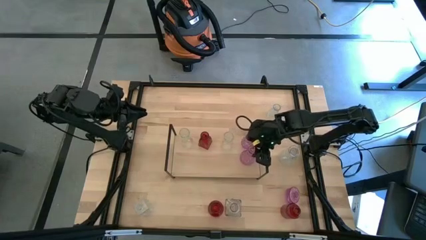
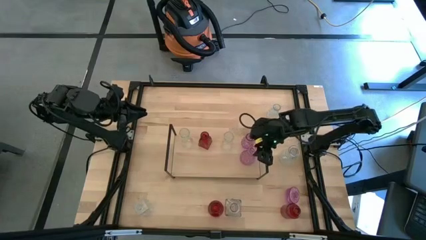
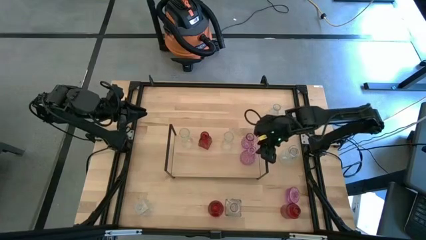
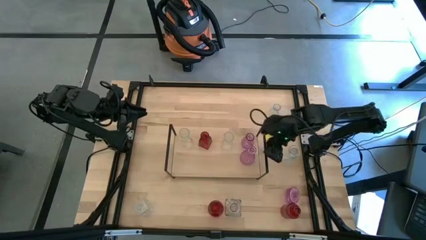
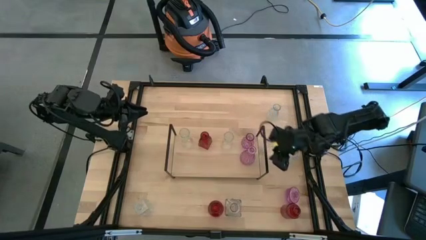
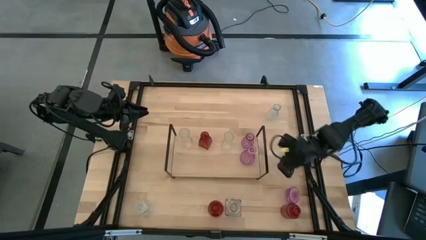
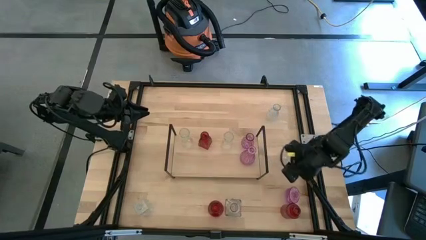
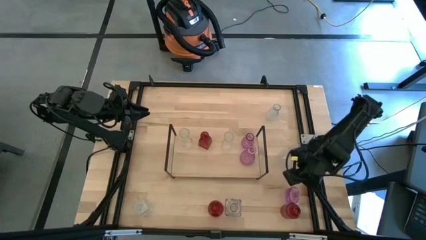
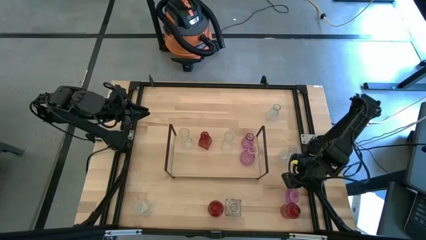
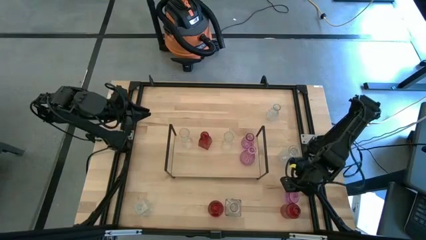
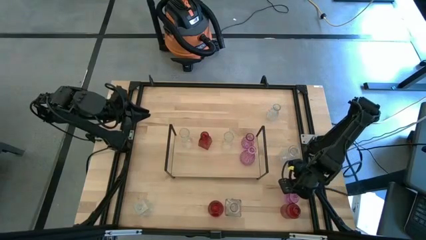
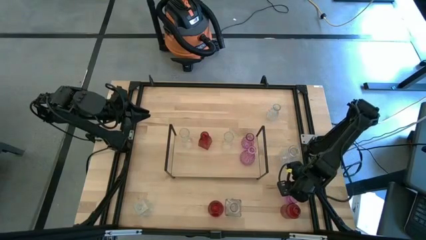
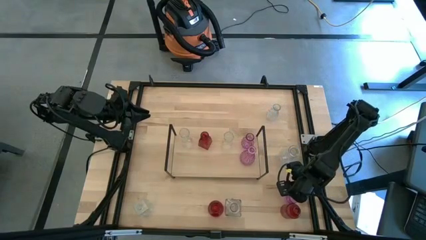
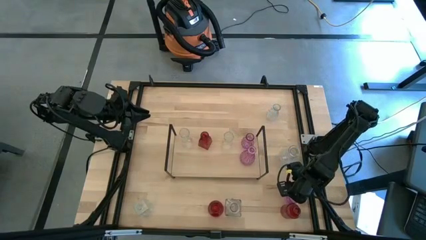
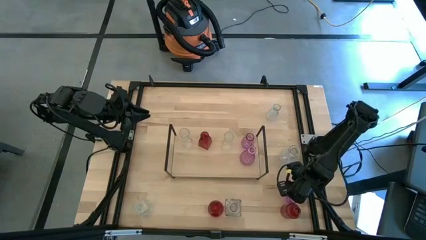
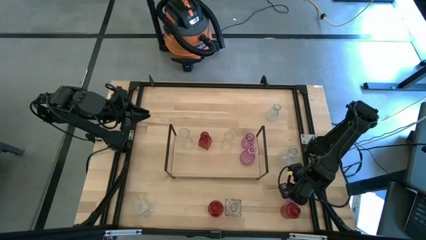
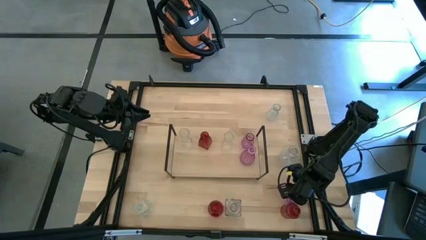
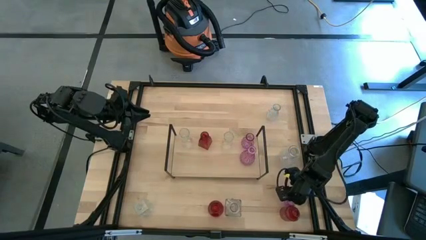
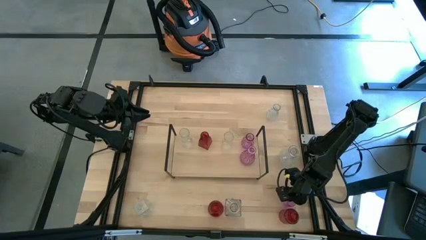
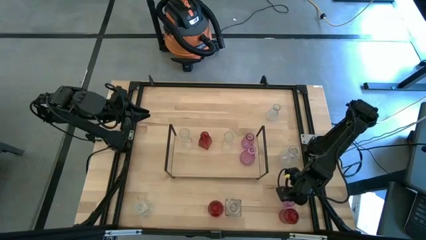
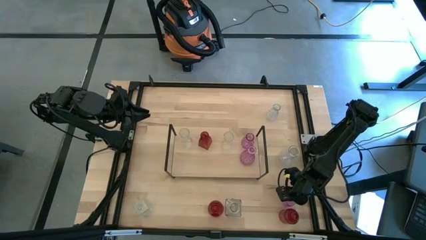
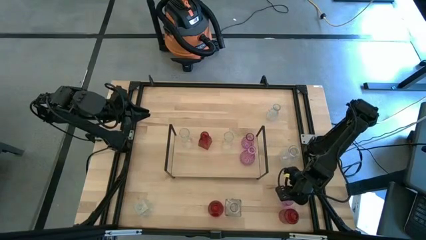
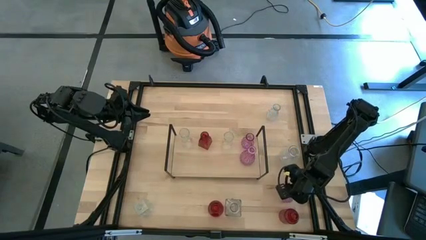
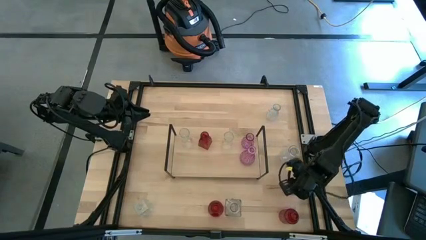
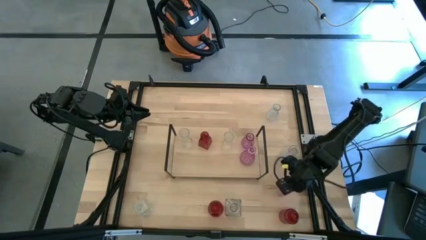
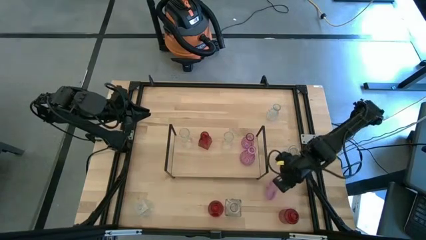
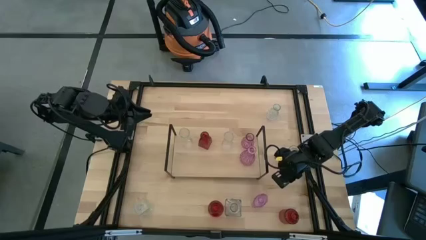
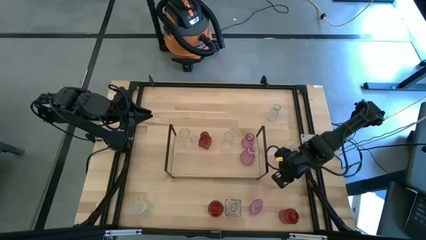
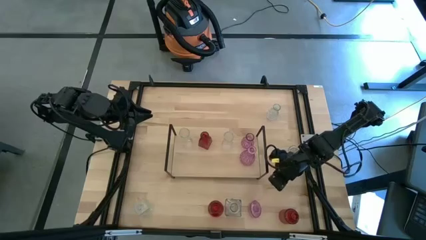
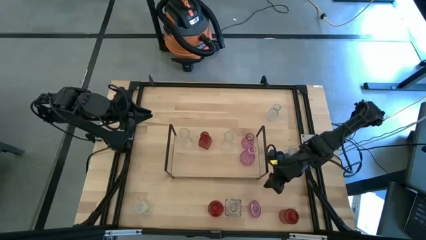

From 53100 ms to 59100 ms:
Task: sort vases onto shelf
Put the purple flower vase on the shelf aligned with the other purple flower vase

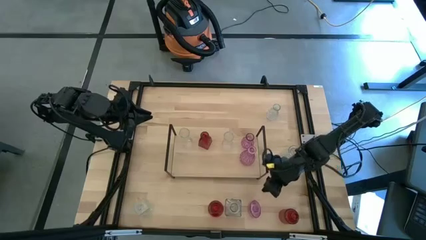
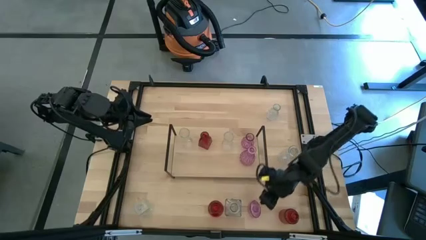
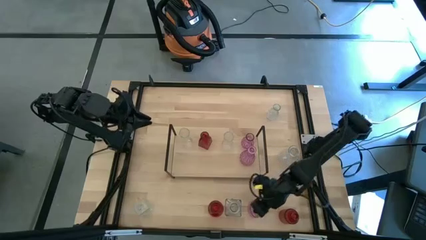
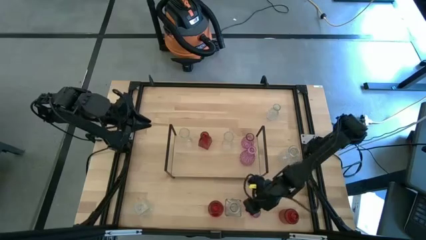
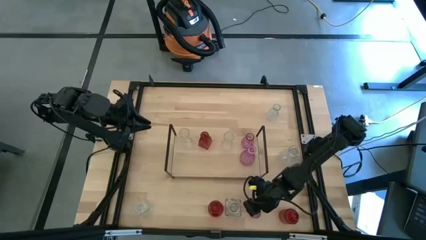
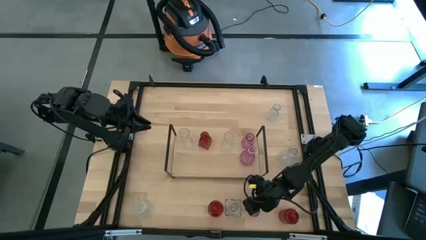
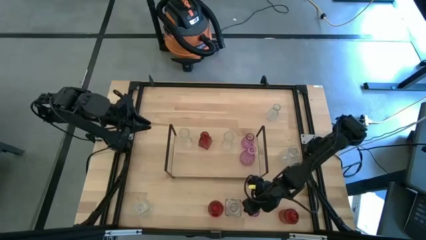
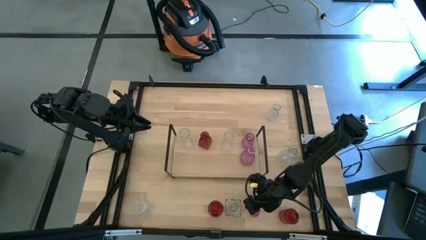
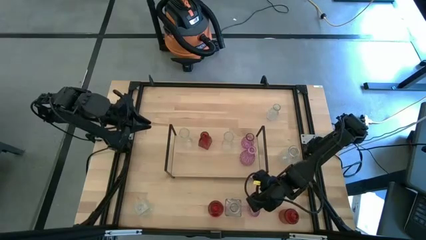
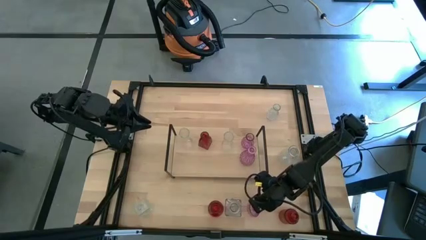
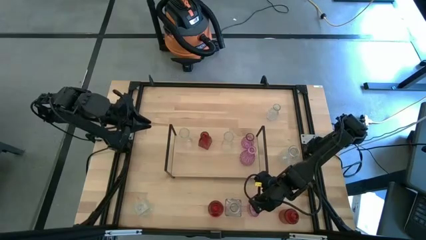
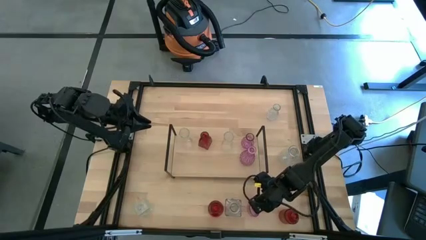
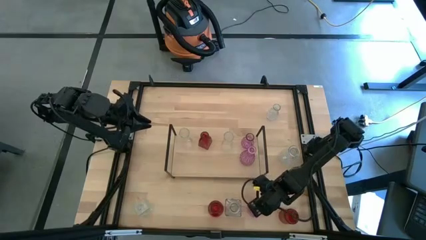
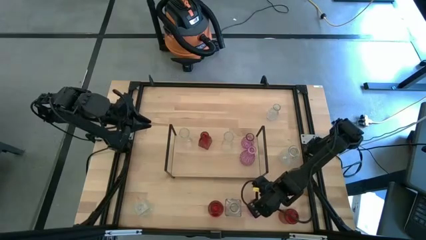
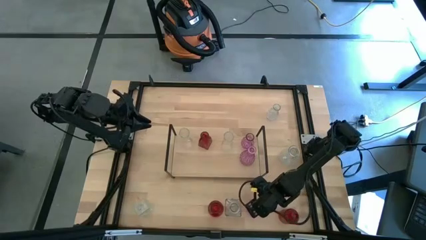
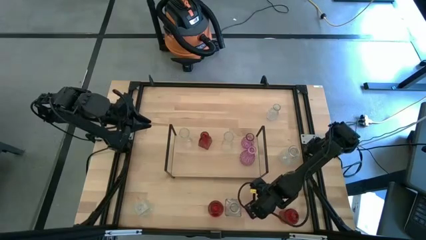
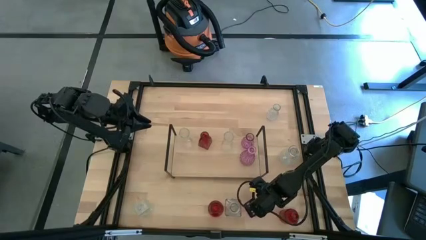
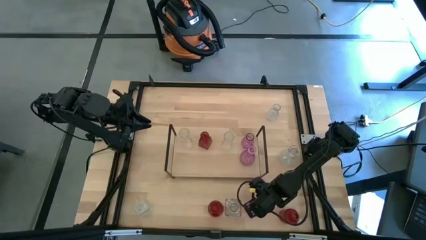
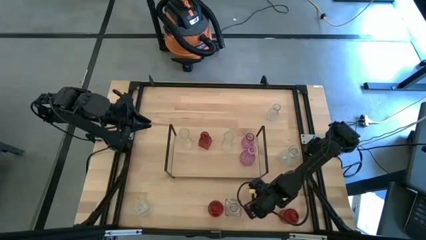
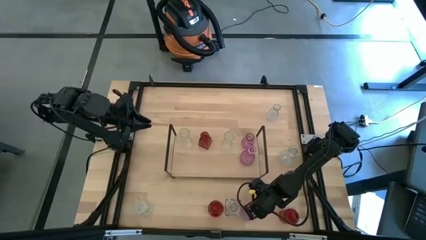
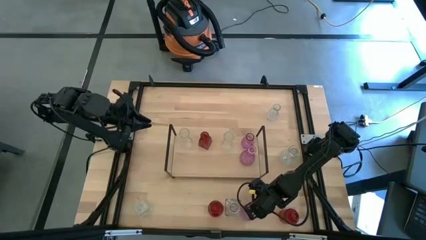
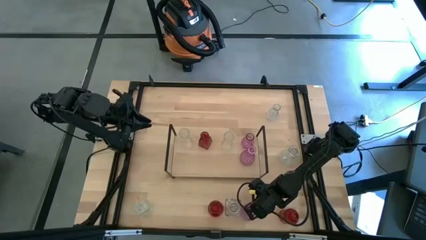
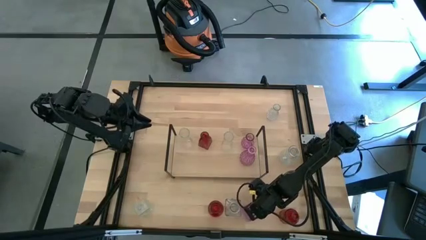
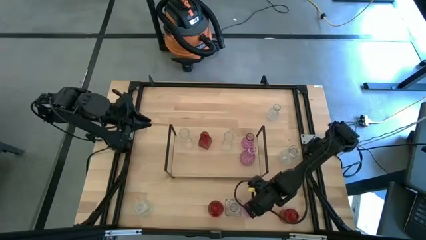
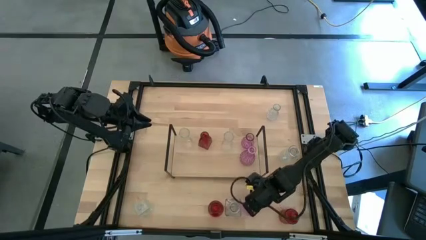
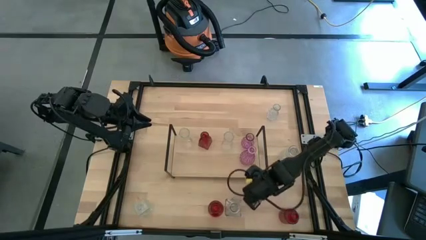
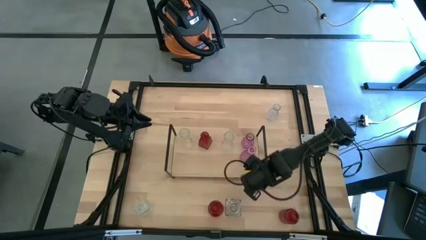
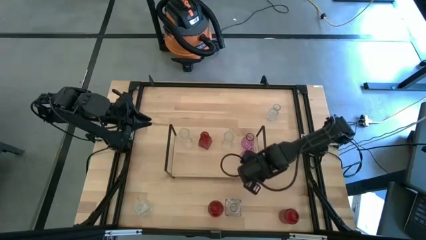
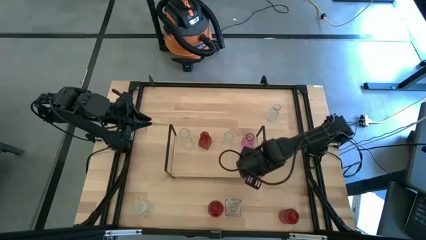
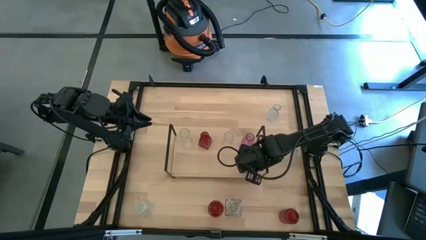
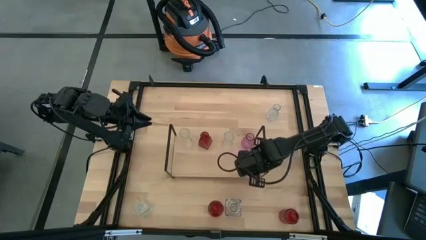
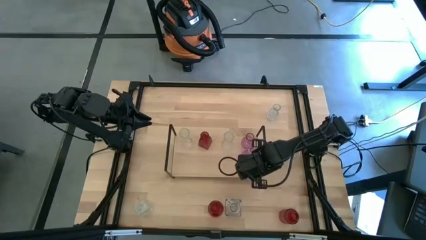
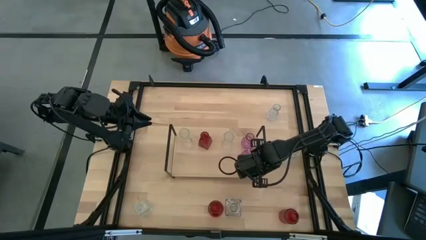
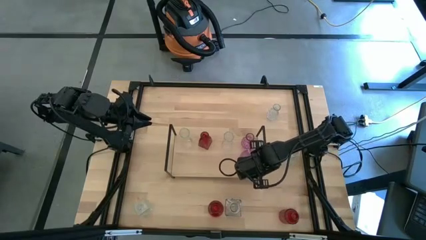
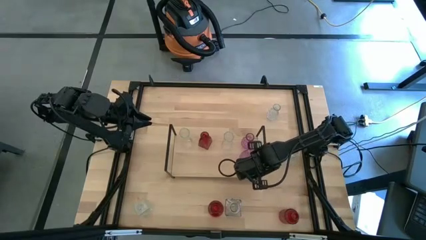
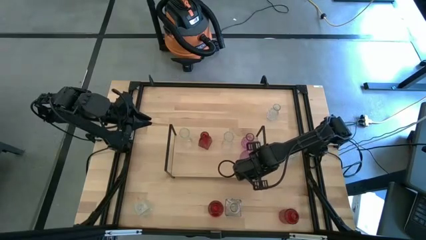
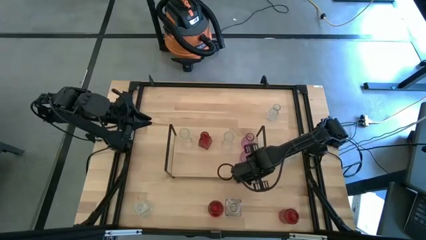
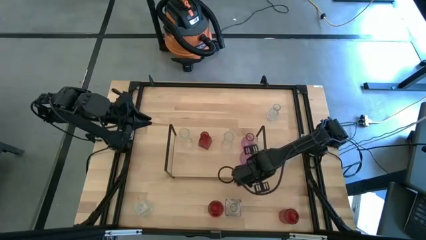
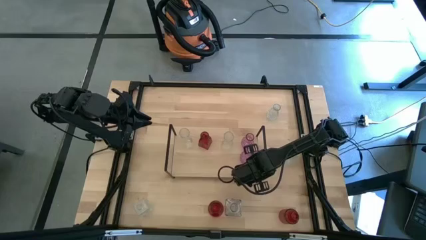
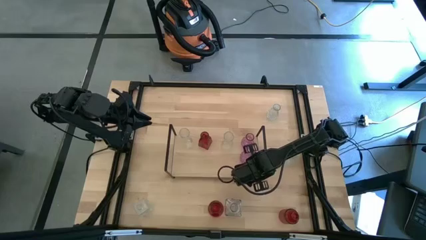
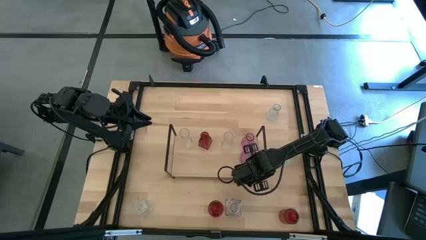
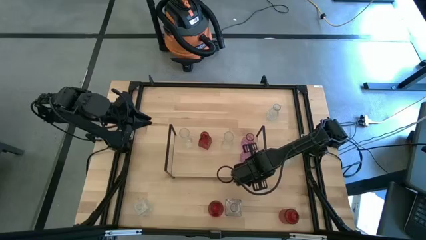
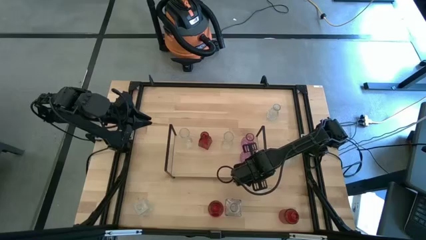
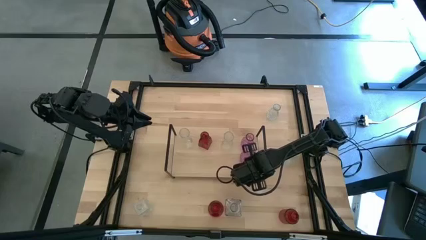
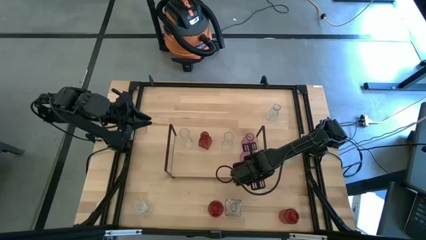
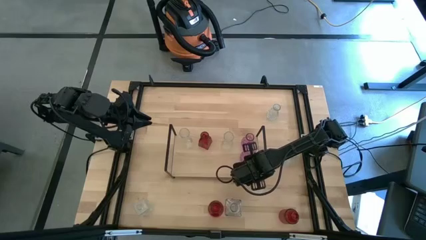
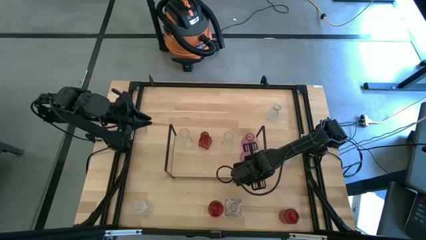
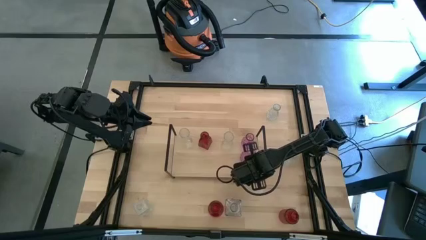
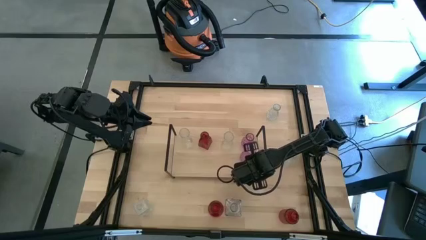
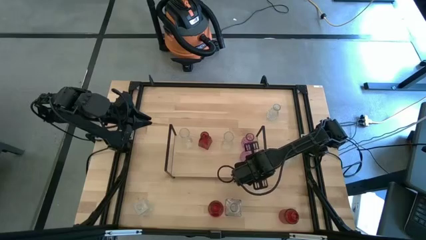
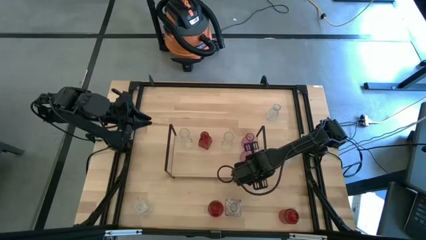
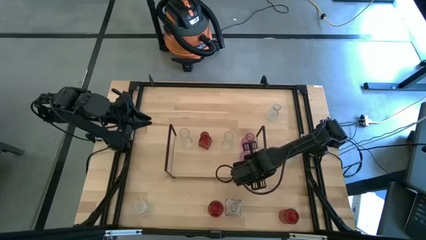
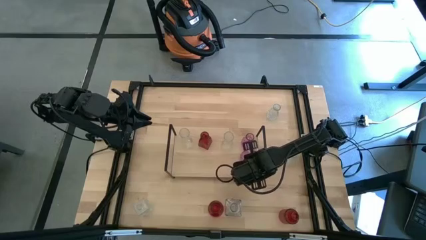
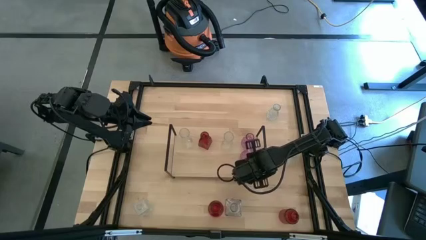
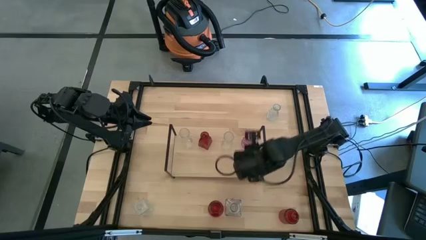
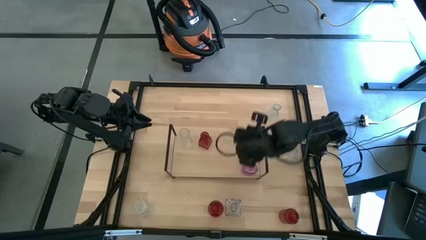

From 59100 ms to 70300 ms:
Put the purple flower vase on the shelf aligned with the other purple flower vase
